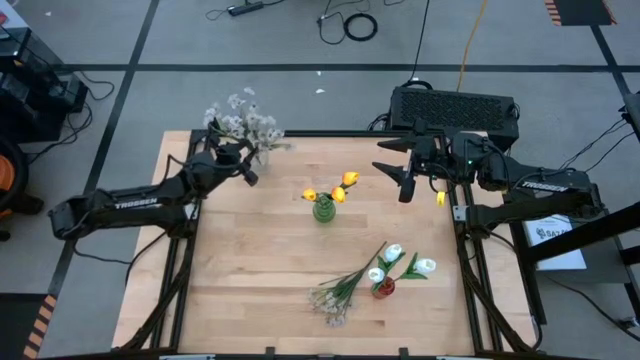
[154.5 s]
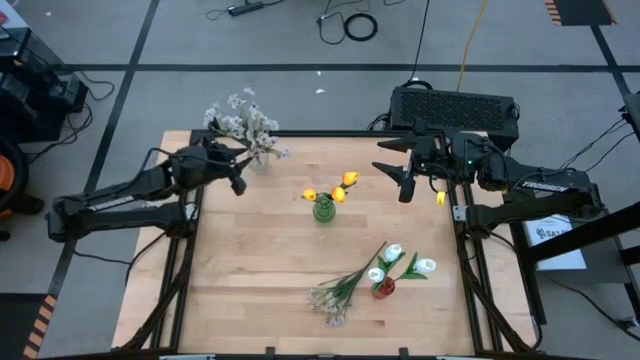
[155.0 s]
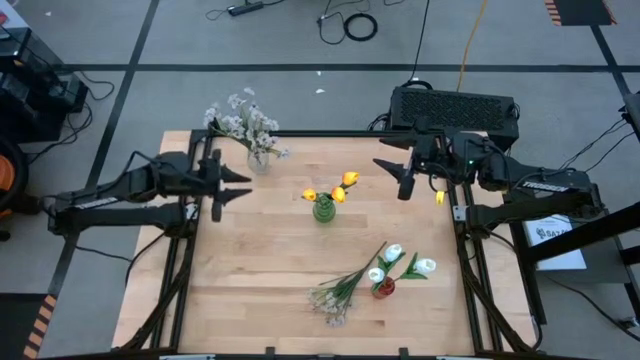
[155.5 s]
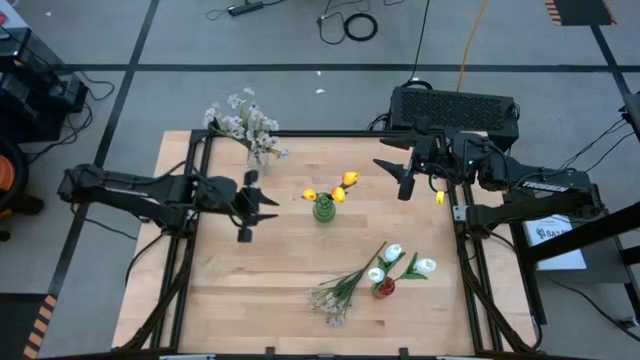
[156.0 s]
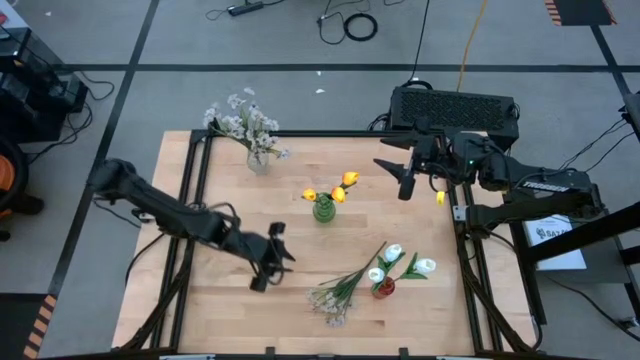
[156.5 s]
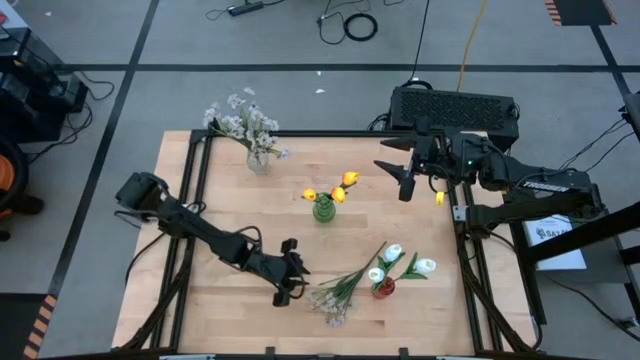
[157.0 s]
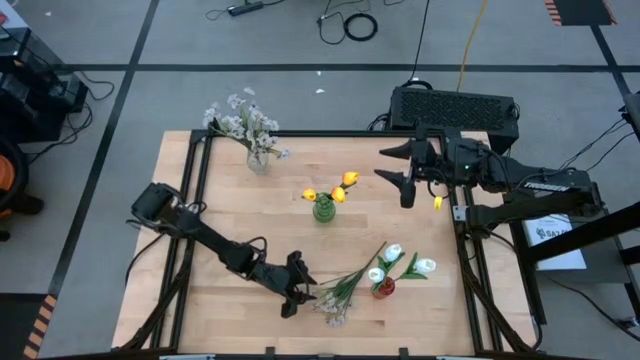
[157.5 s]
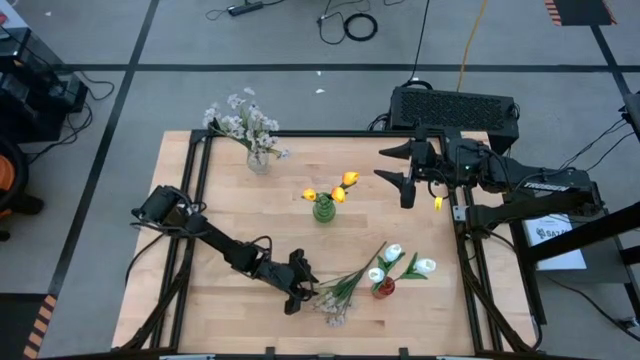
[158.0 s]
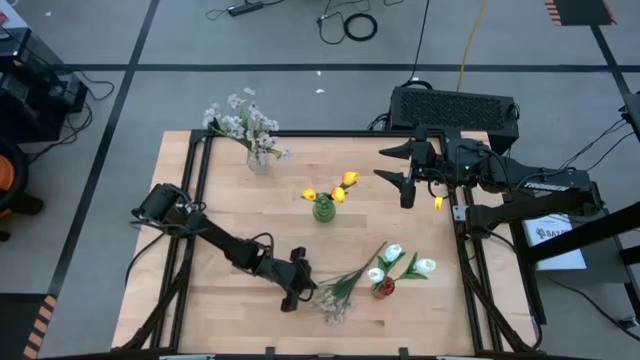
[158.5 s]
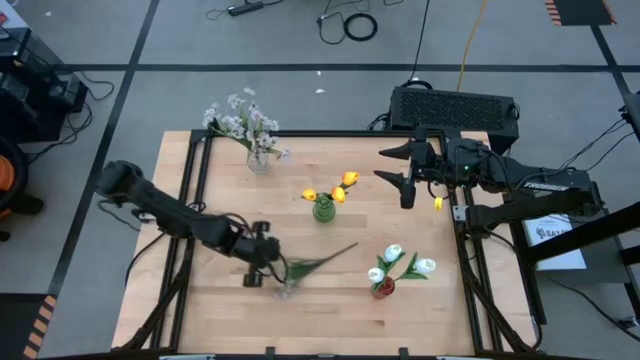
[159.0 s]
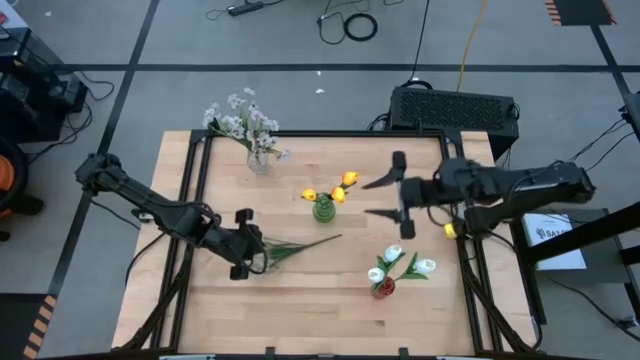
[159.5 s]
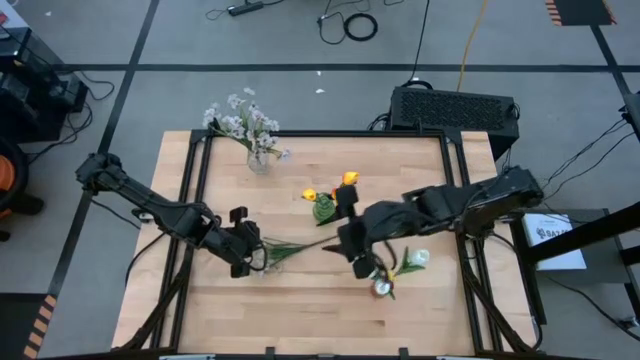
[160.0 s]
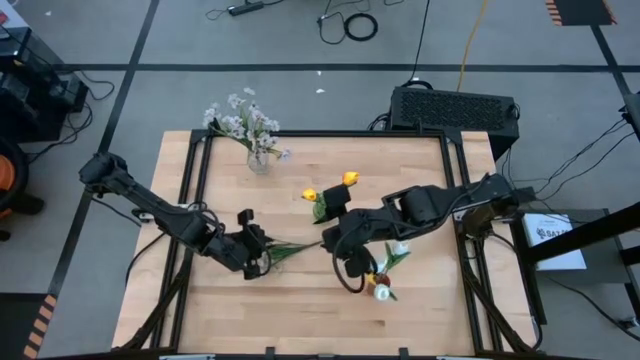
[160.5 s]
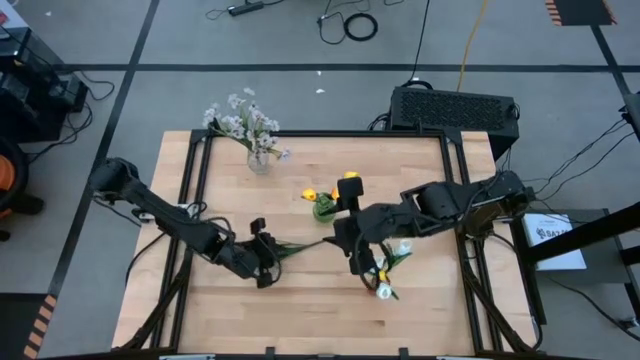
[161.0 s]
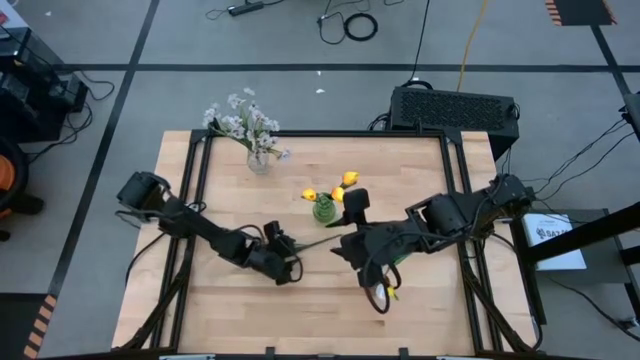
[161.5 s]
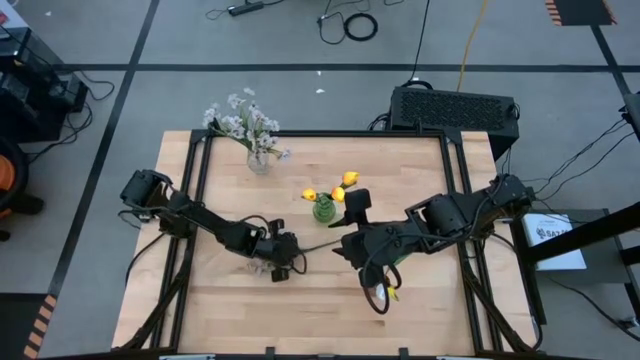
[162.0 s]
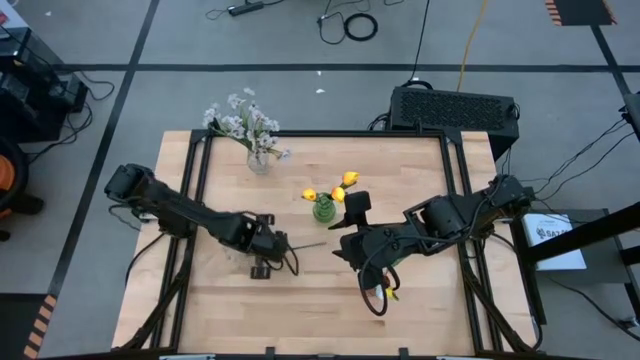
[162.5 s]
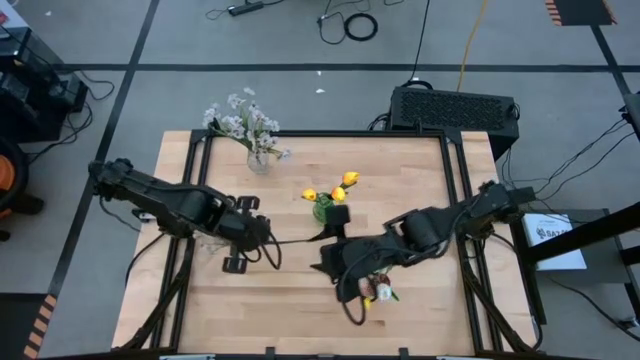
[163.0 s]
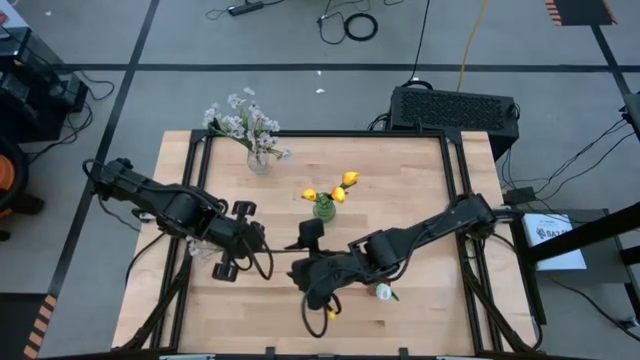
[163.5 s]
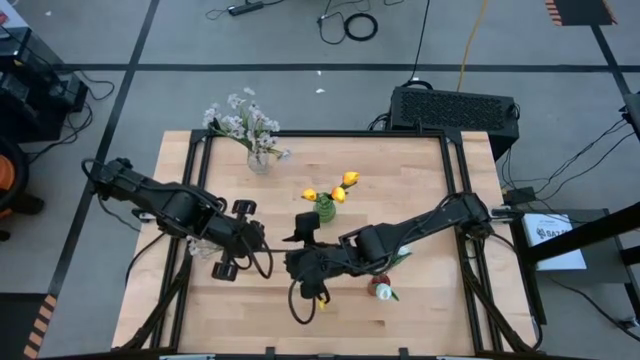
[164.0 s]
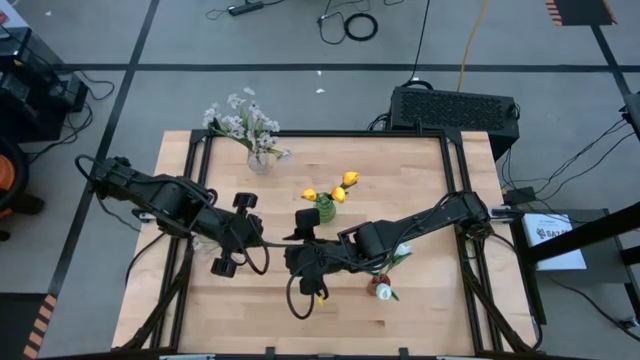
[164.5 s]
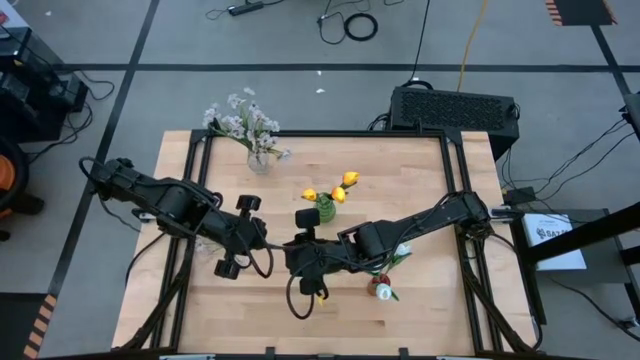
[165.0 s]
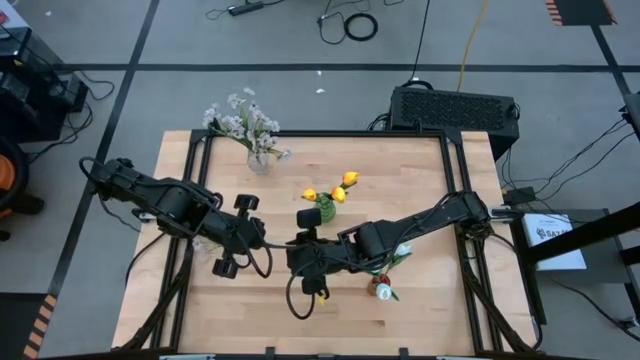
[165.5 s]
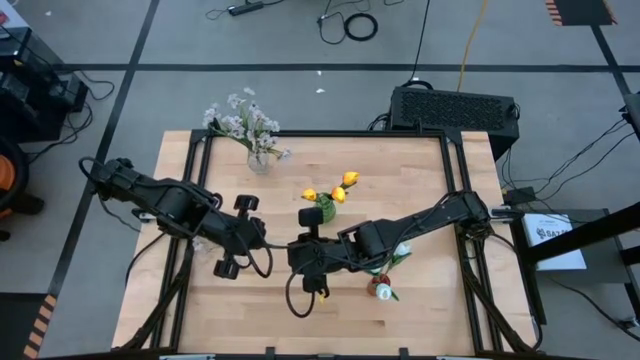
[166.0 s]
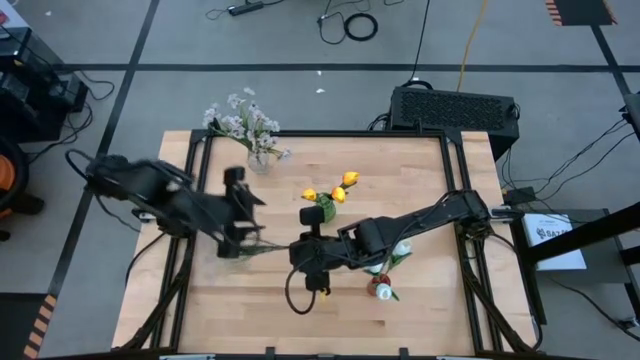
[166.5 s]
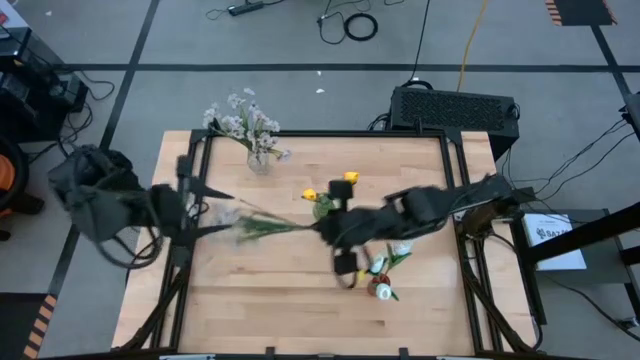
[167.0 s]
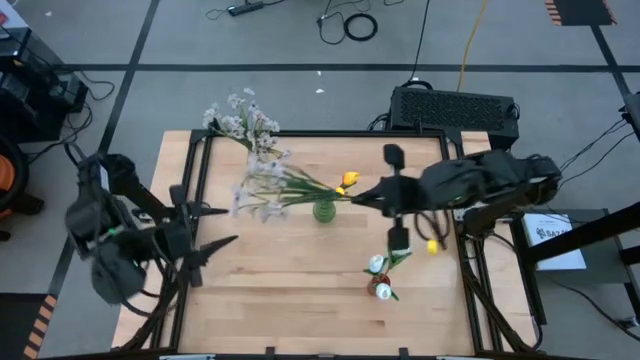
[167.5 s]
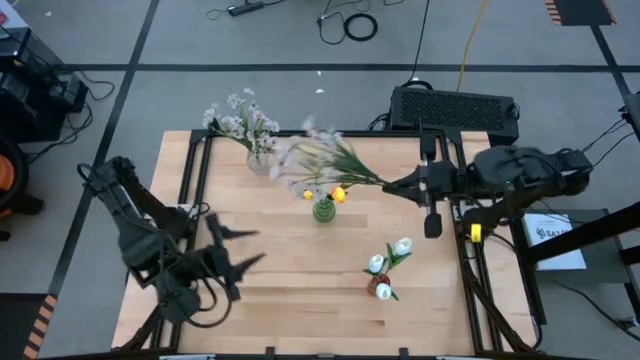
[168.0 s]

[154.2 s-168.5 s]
Task: Sort flowers into vase by color
Put the white flowers into the transparent vase

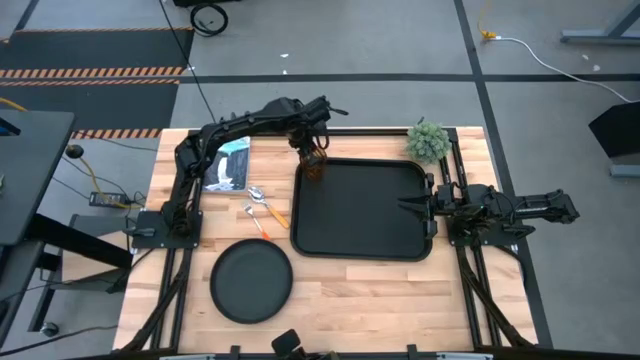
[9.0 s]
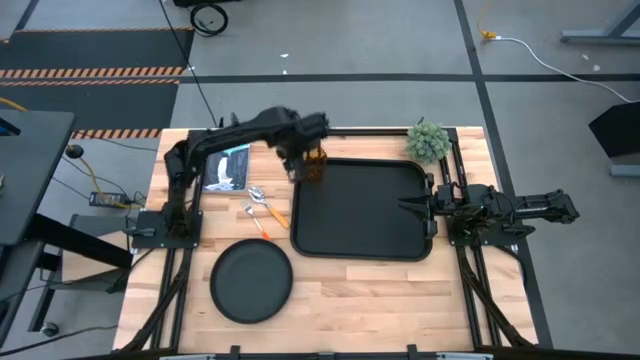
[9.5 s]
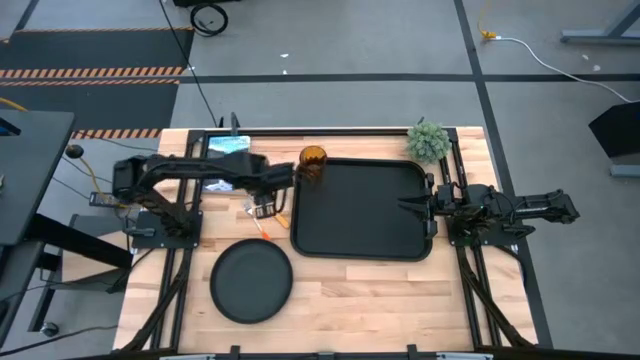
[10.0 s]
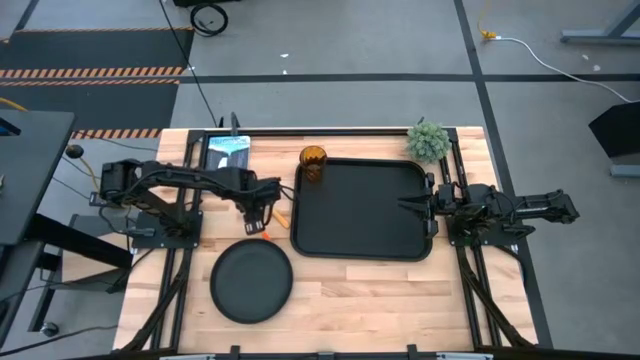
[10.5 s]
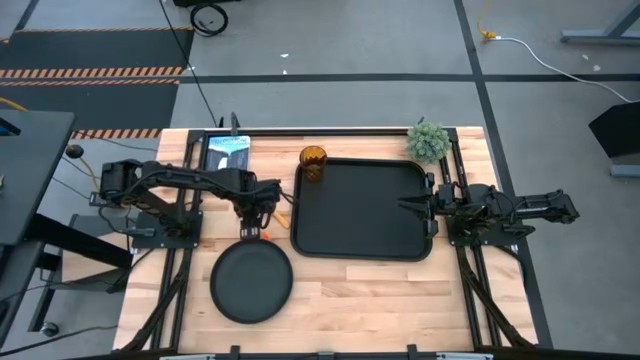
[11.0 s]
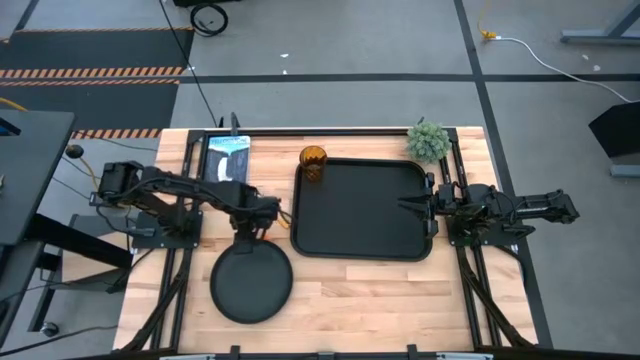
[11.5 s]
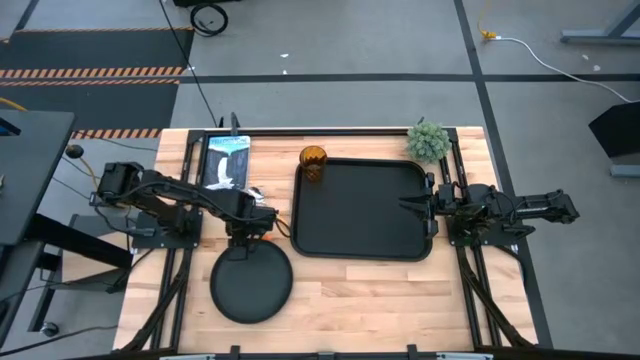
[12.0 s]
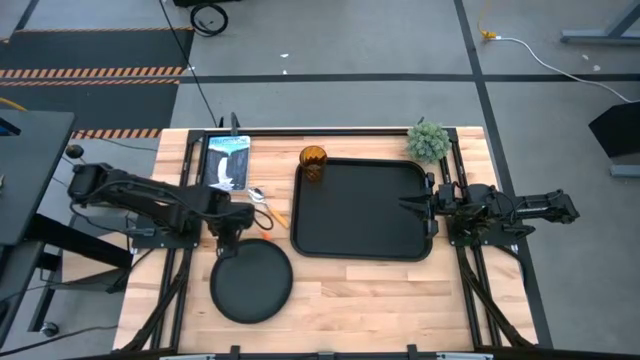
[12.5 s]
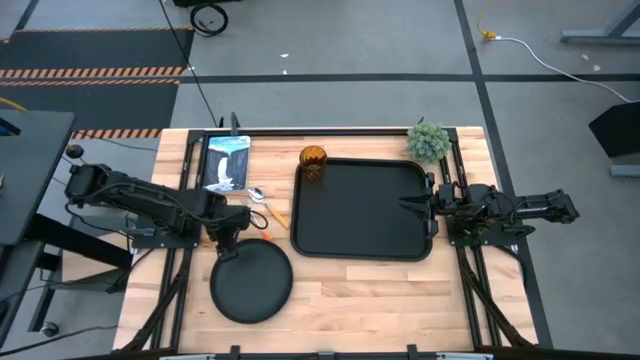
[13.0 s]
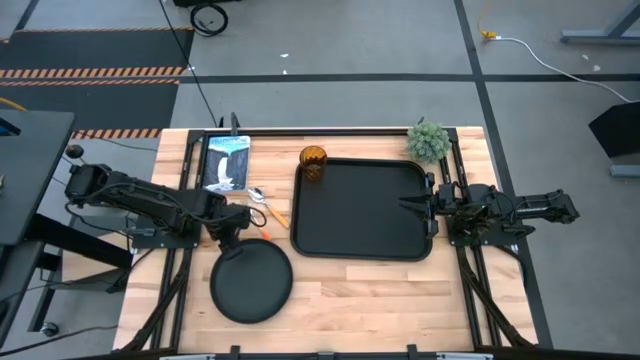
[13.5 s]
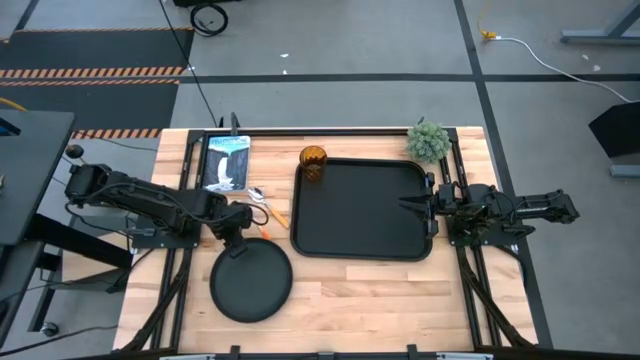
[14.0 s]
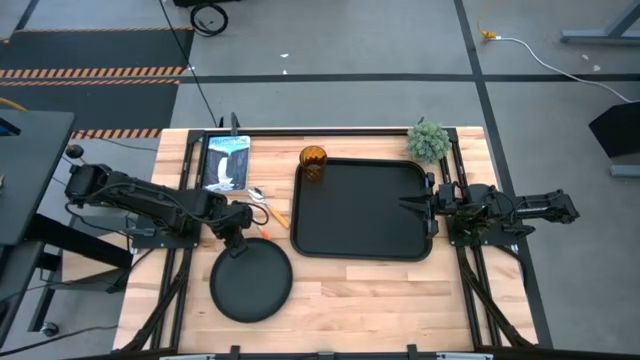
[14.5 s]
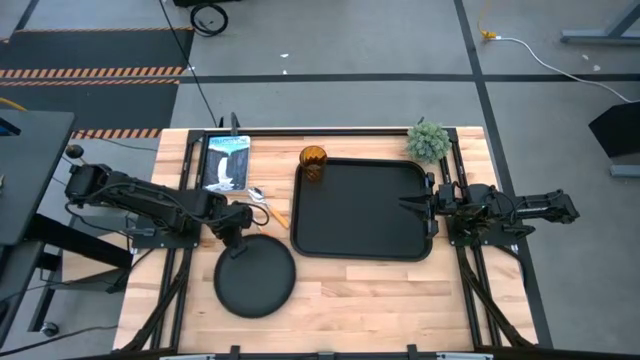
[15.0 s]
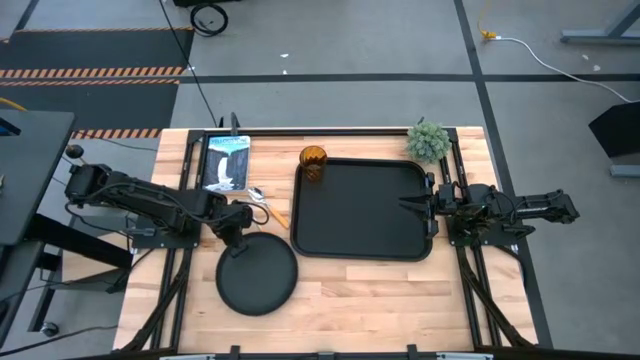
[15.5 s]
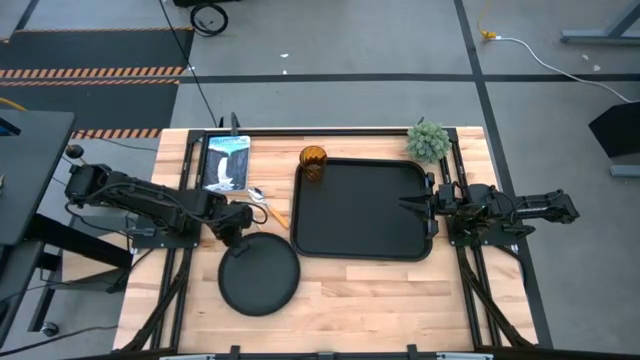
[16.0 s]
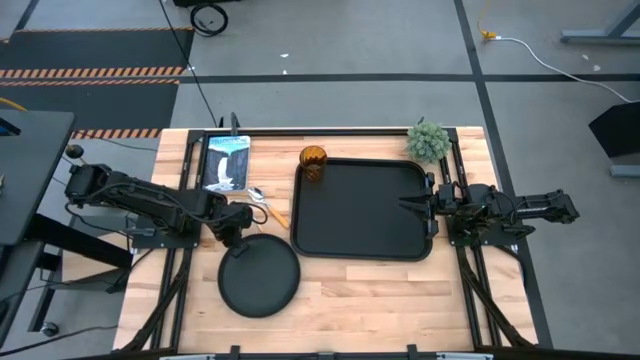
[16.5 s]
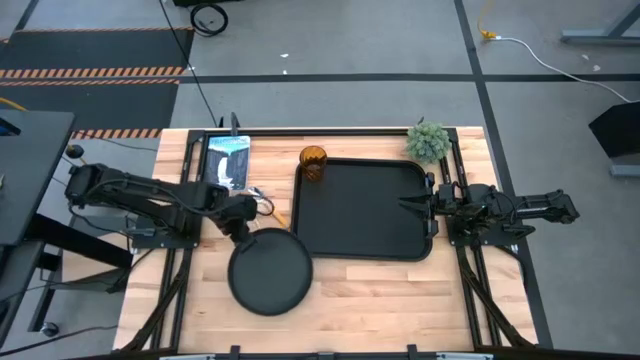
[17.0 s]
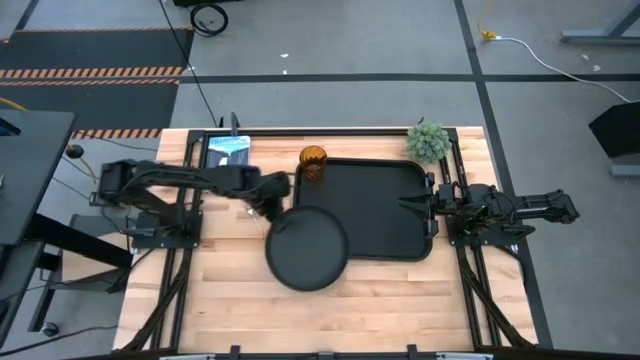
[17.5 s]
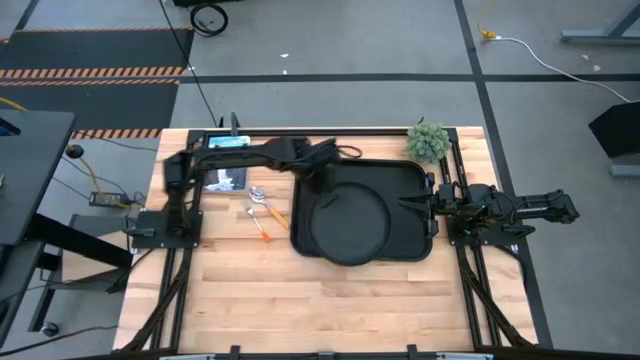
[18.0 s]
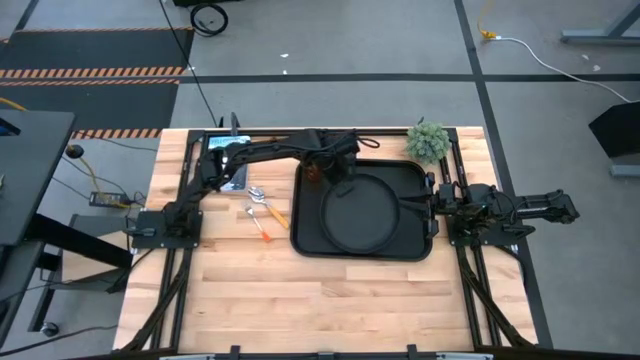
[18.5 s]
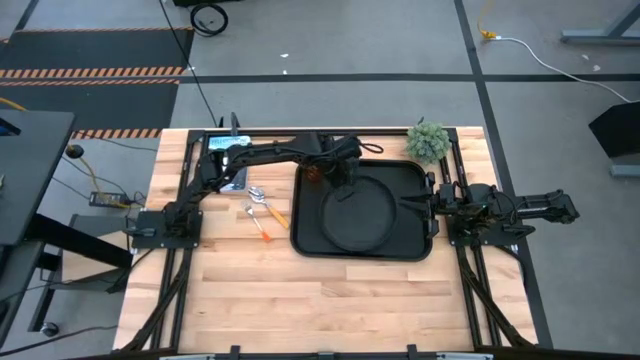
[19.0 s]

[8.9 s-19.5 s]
Task: Pick and place plate/cup/fork/spoon on tray
Put the black plate on the middle of the black table tray
